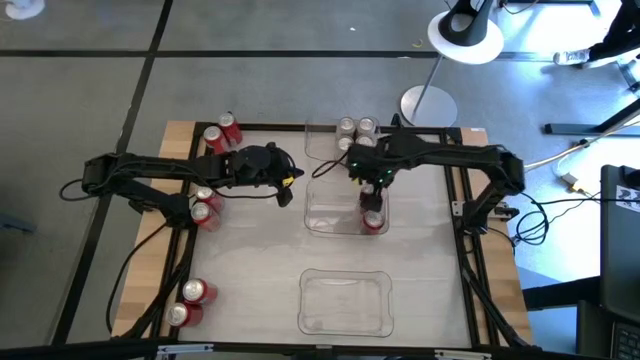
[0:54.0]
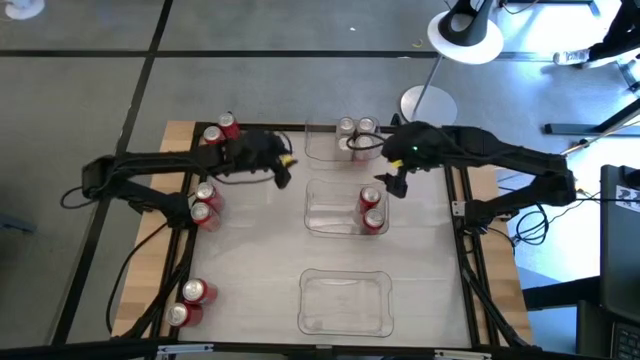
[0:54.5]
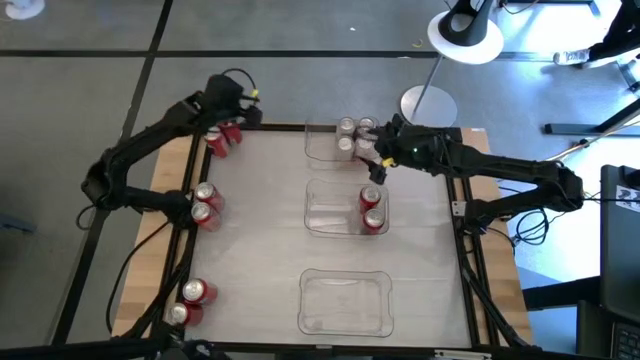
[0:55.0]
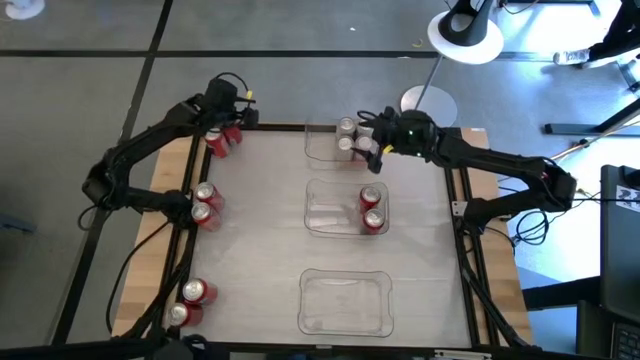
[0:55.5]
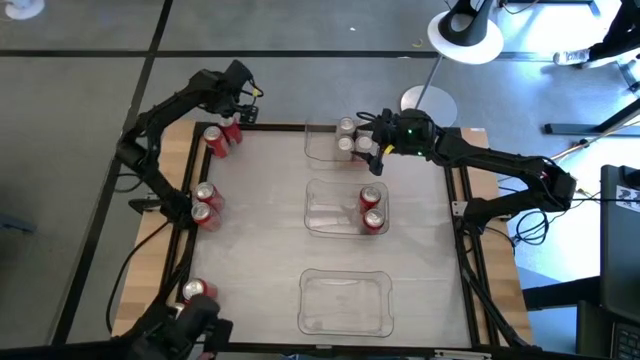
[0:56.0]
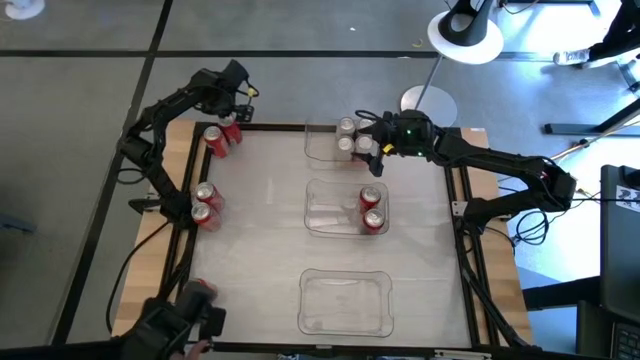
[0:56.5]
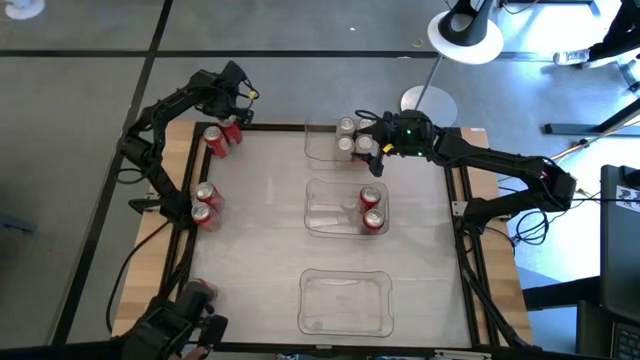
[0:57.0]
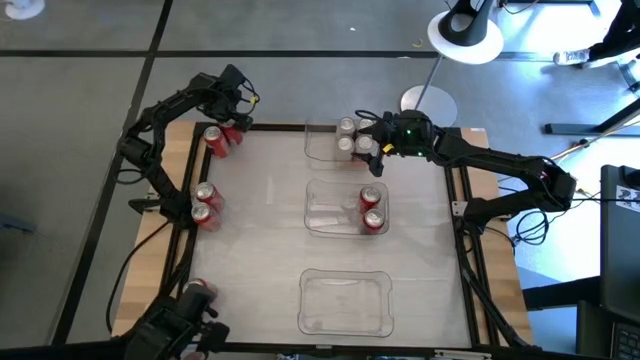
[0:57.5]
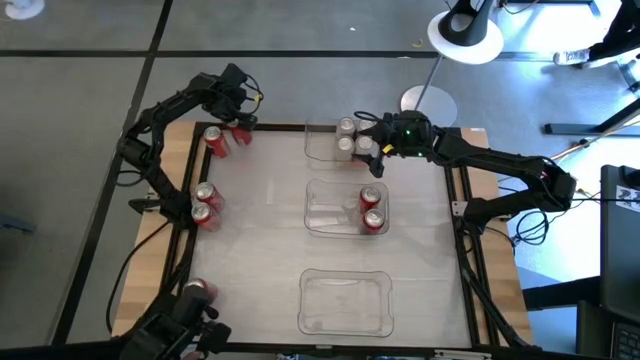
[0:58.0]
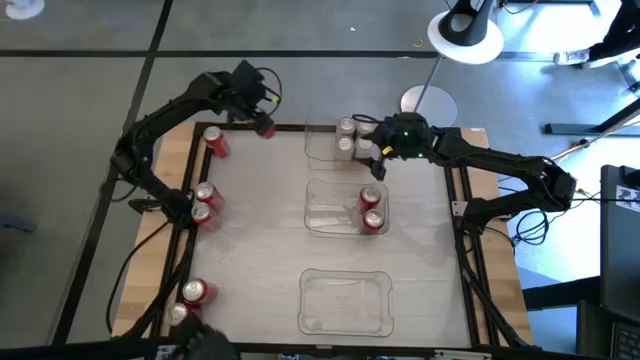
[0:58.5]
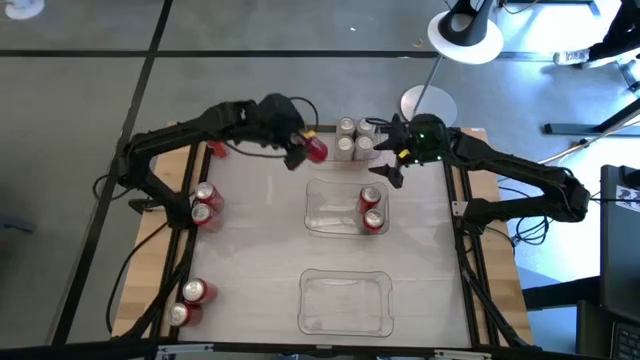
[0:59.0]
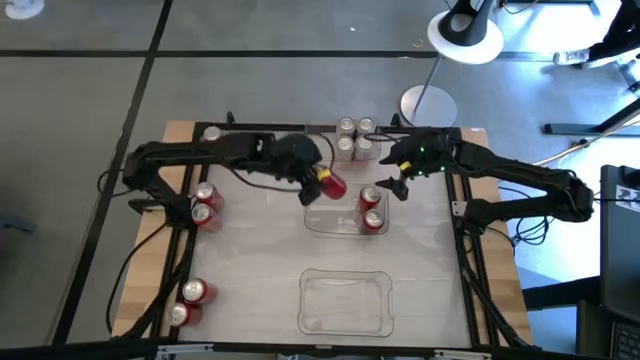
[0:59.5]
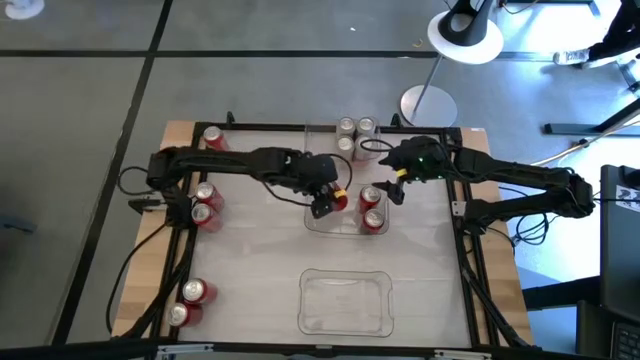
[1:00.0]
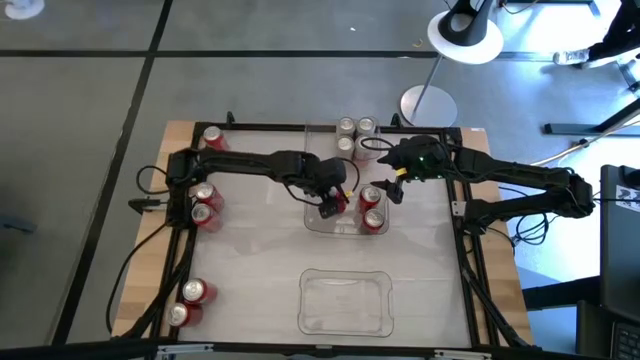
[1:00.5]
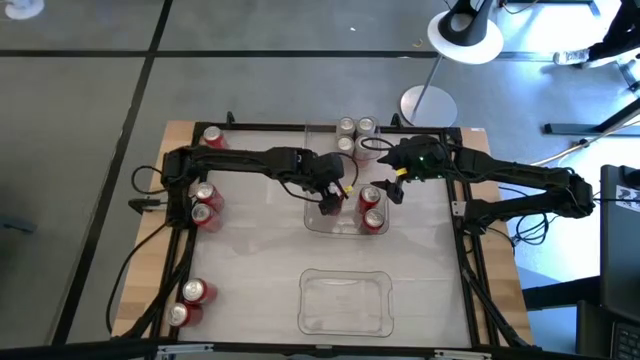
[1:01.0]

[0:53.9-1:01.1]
Task: Sort soda cans
Put the top red black soda can into the middle transparent bin

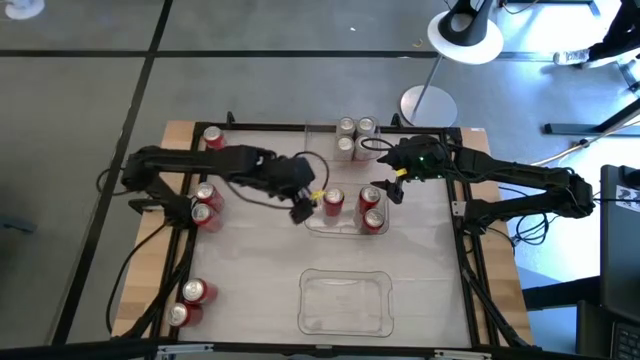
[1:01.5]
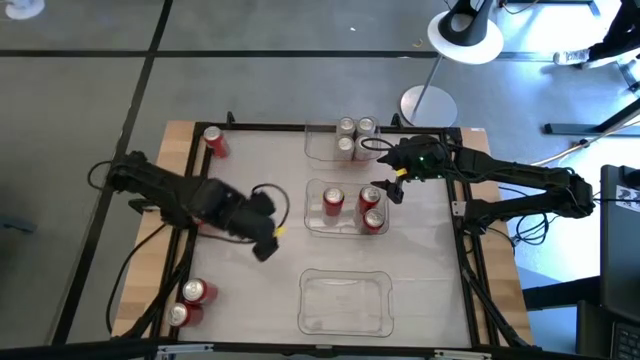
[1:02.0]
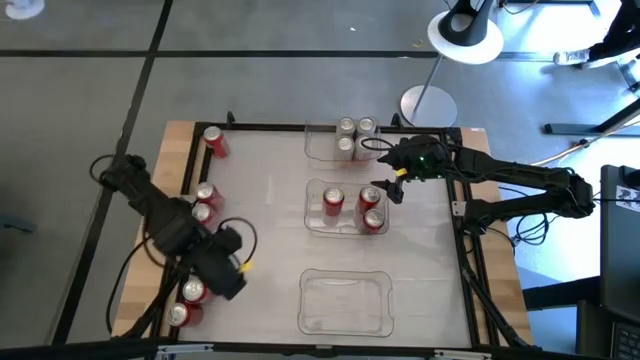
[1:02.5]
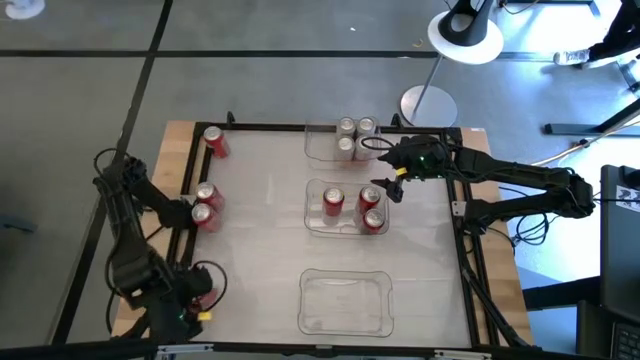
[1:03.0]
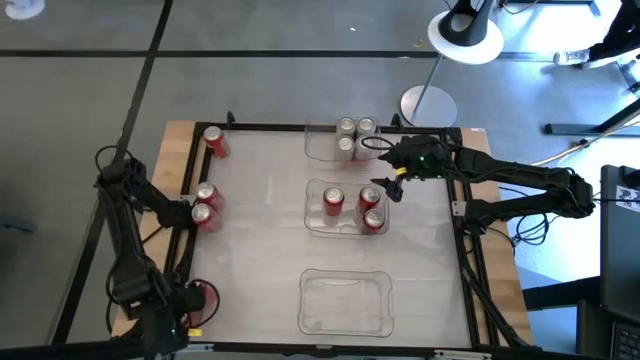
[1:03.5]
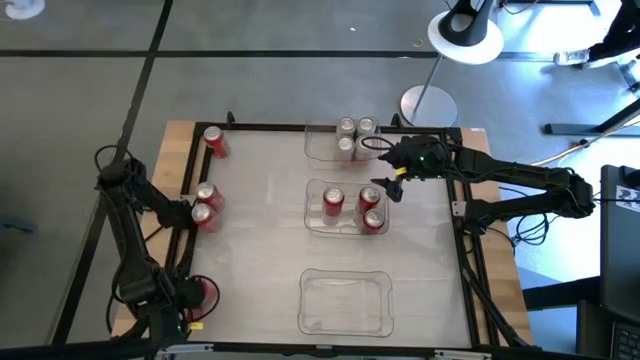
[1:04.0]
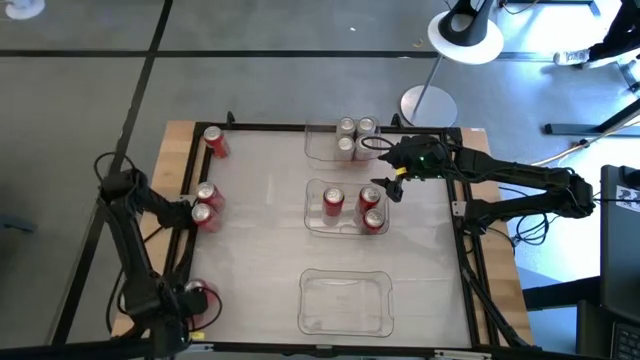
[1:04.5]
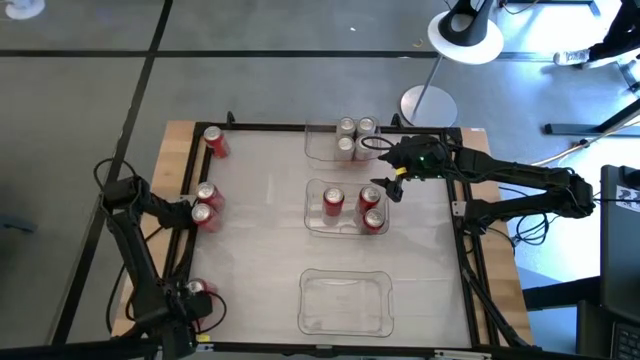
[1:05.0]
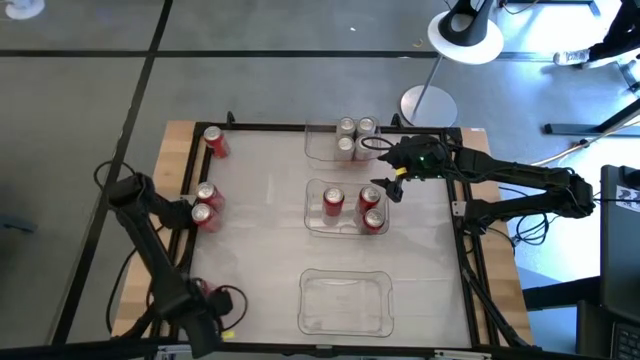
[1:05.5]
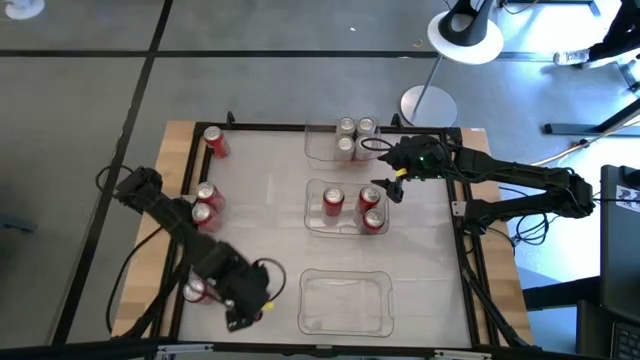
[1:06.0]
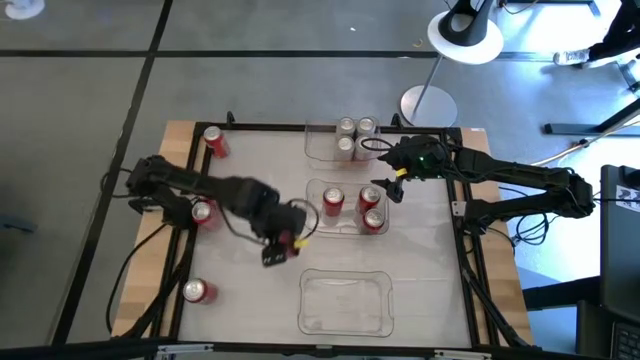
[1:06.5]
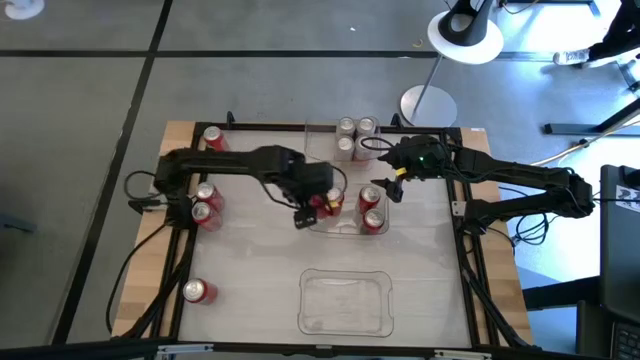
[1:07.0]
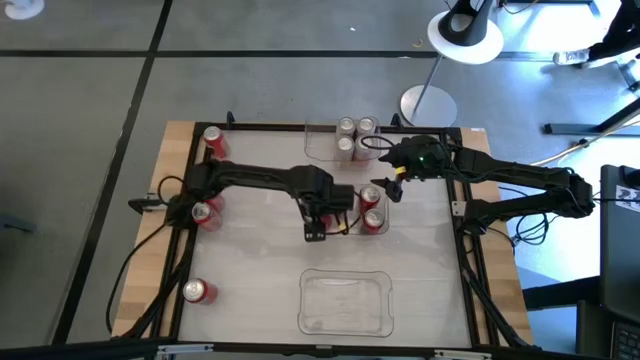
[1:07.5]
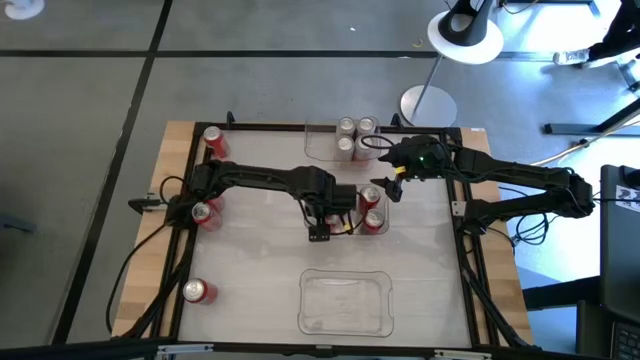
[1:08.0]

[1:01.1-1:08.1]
Put the red black soda can into the middle transparent bin

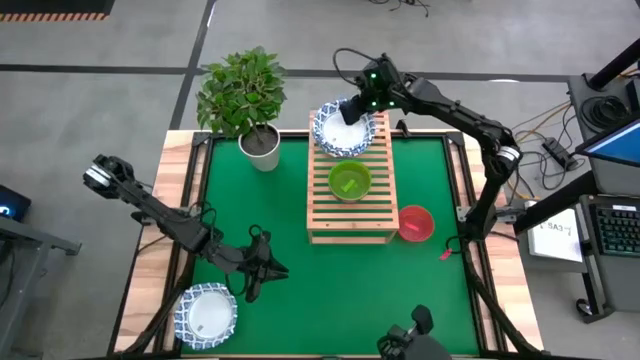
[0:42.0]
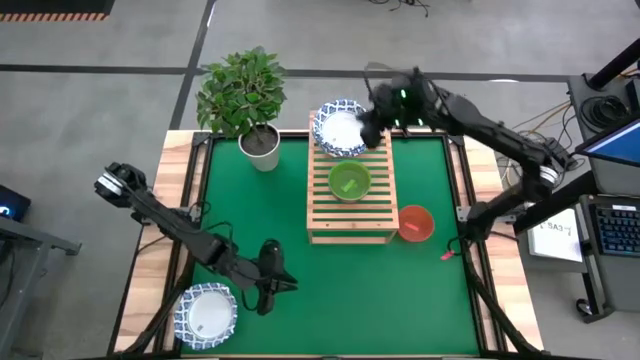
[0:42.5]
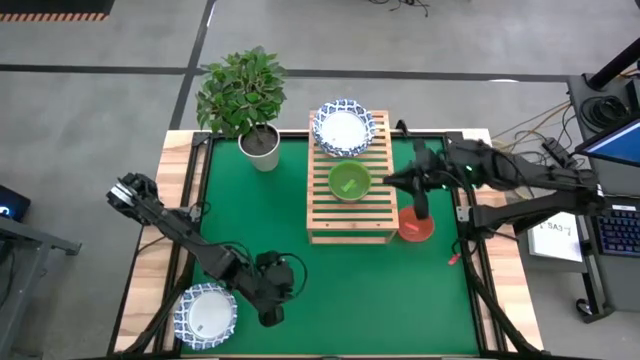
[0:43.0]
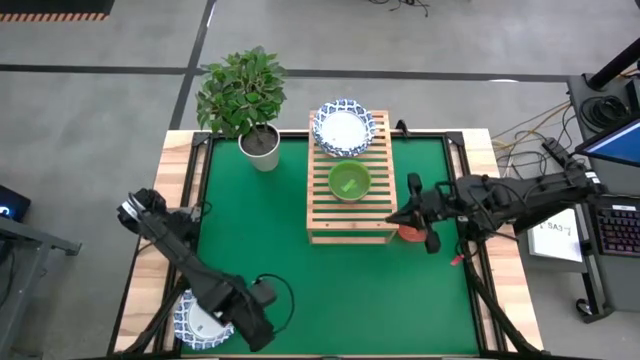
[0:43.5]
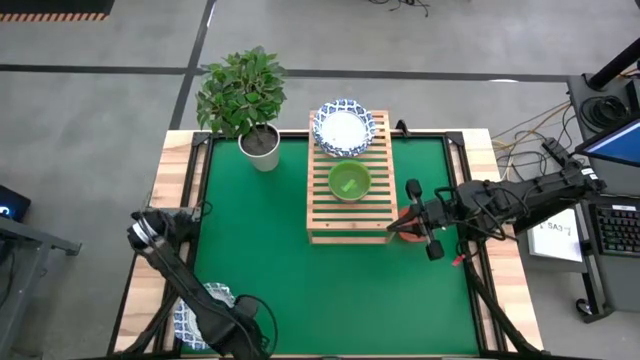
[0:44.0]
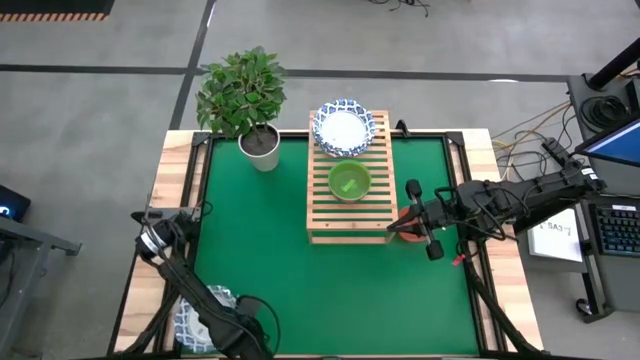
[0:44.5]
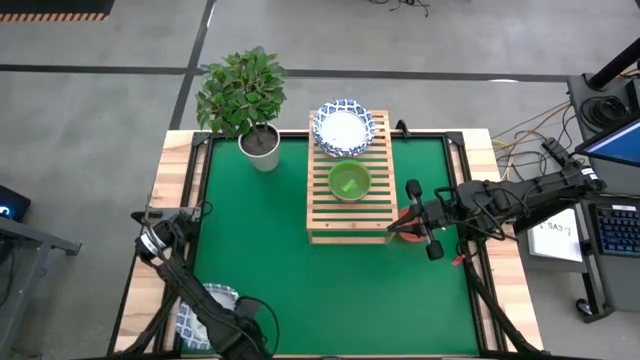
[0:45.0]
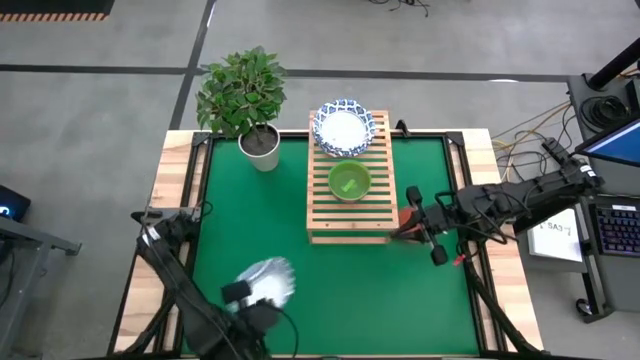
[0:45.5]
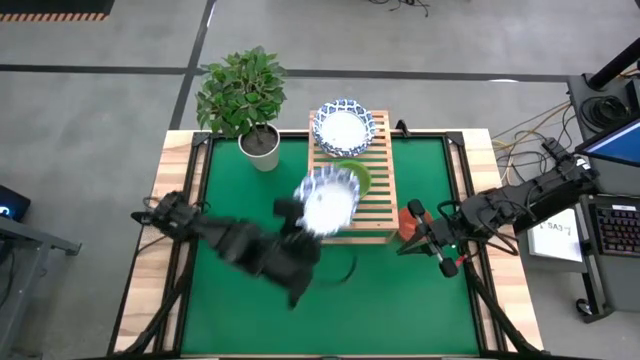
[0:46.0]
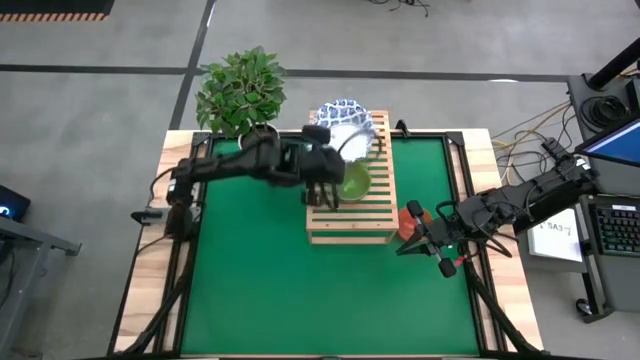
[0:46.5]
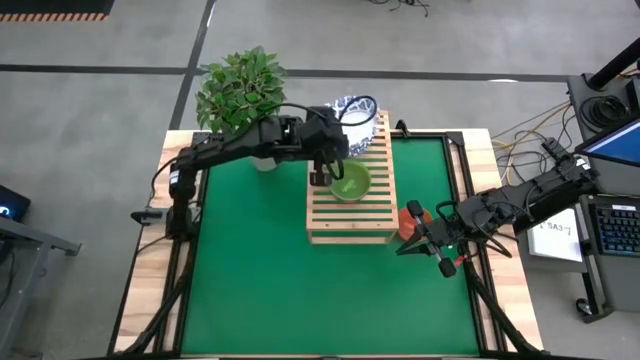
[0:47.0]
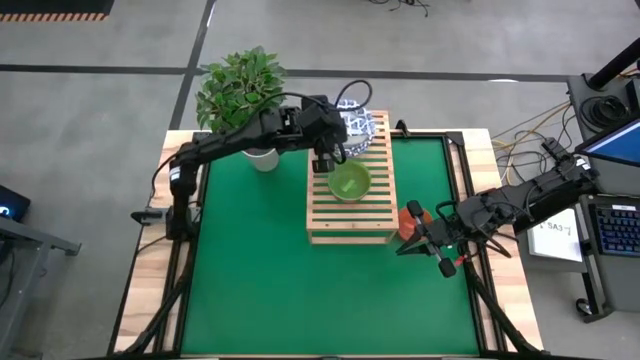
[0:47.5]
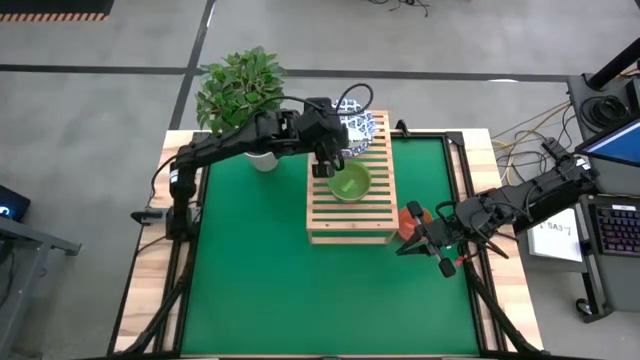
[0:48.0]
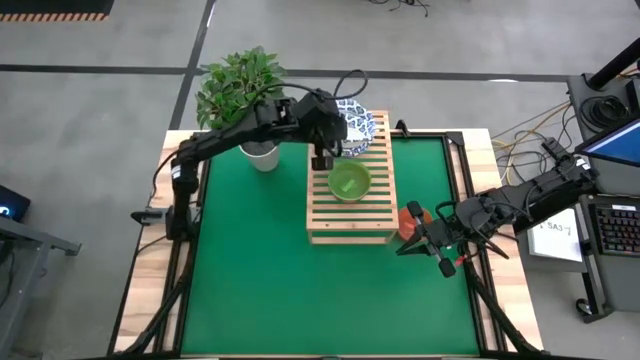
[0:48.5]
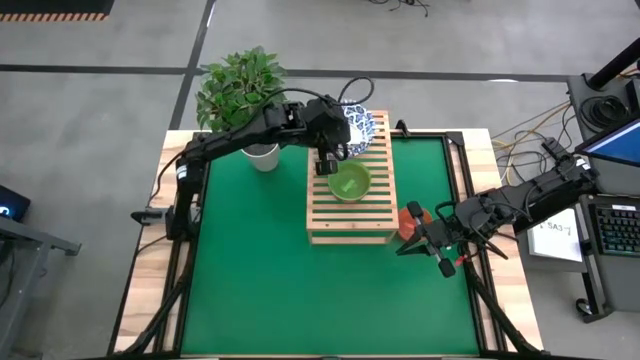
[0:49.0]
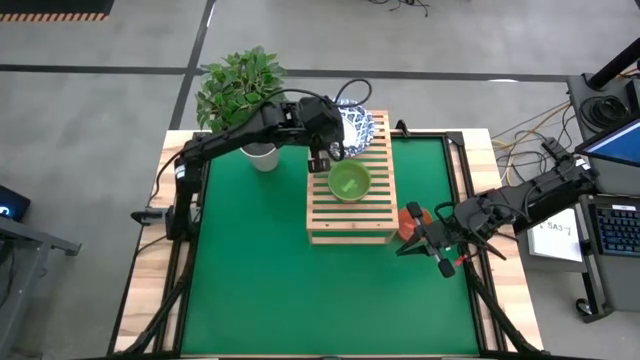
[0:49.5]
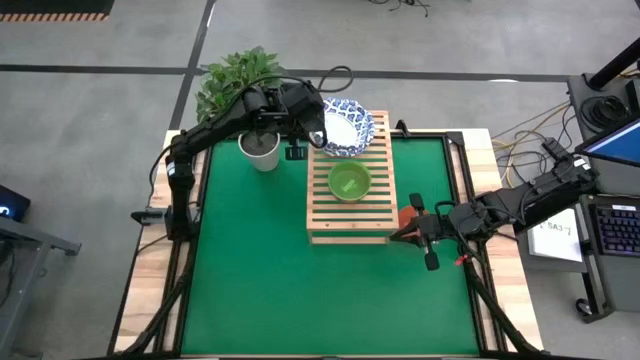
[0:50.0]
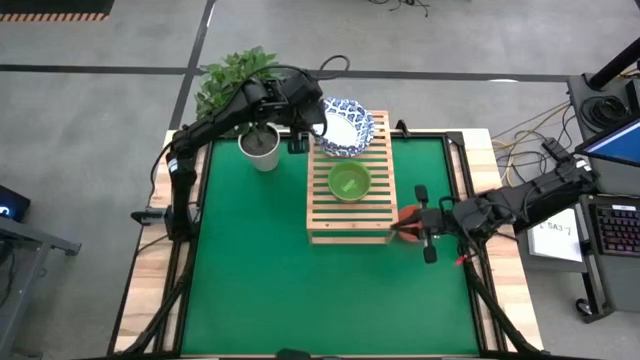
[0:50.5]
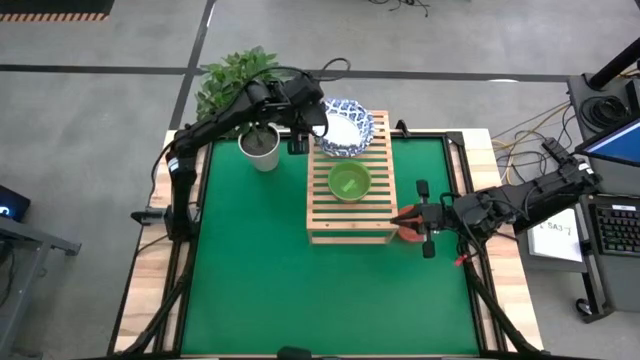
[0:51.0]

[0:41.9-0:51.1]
Task: Place and stack bowls onto a shelf
Stack the white patterned bowl on top of the other white patterned bowl
